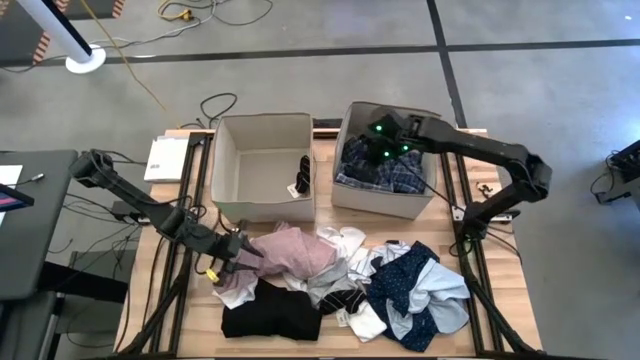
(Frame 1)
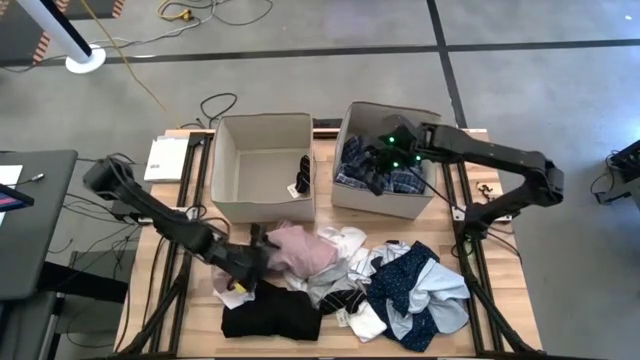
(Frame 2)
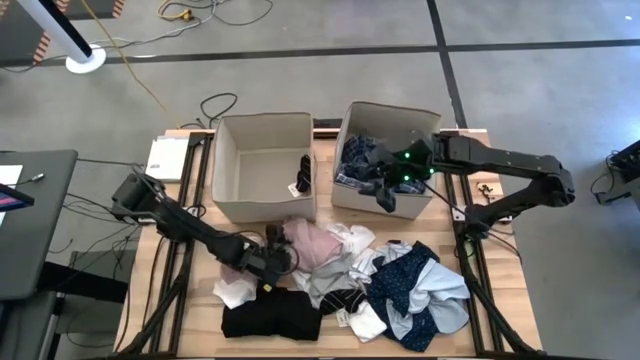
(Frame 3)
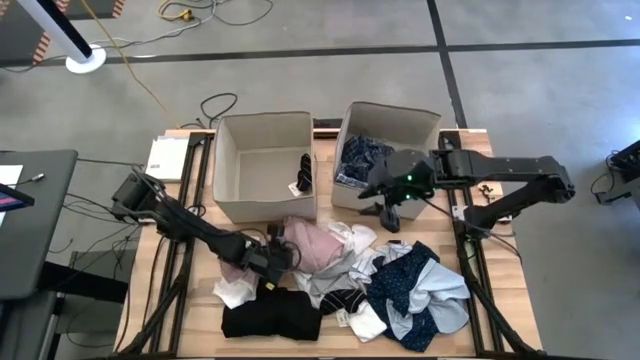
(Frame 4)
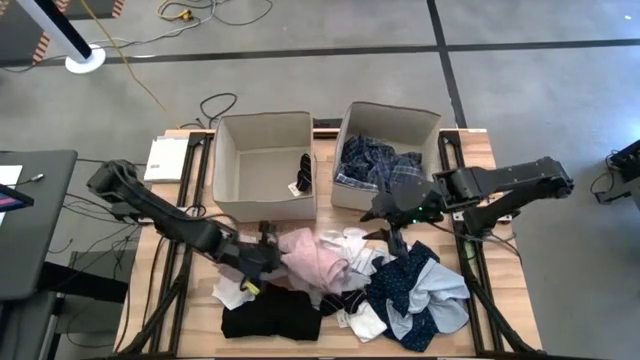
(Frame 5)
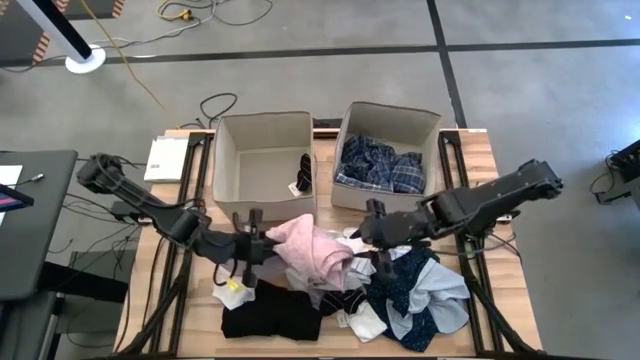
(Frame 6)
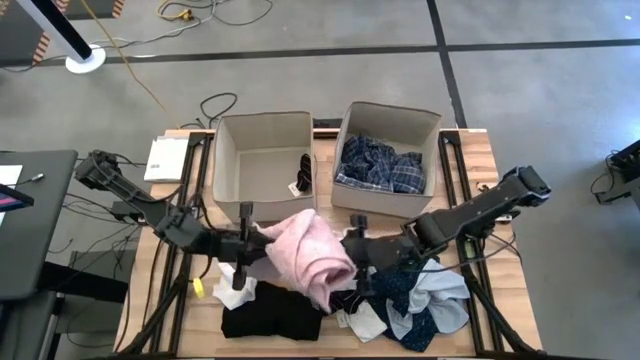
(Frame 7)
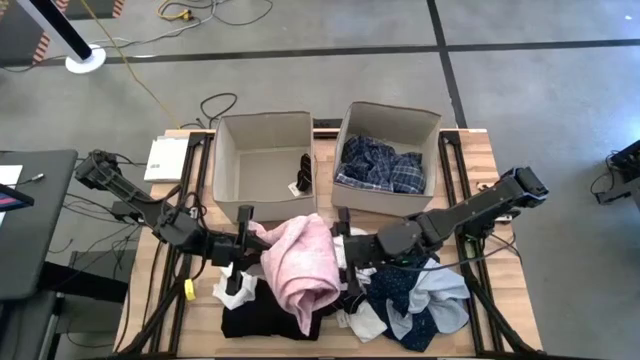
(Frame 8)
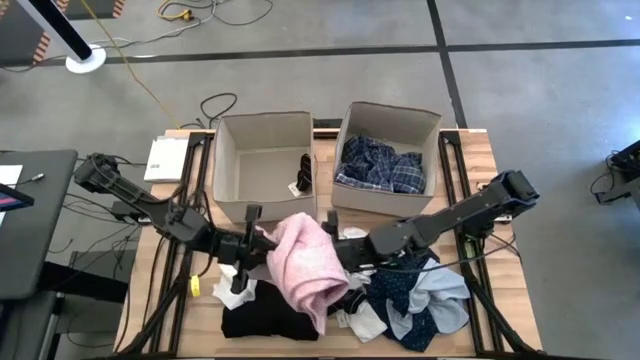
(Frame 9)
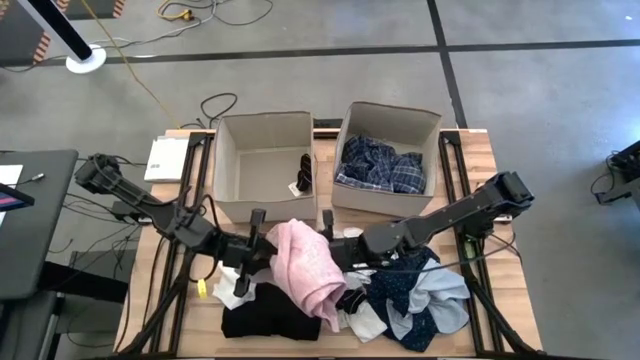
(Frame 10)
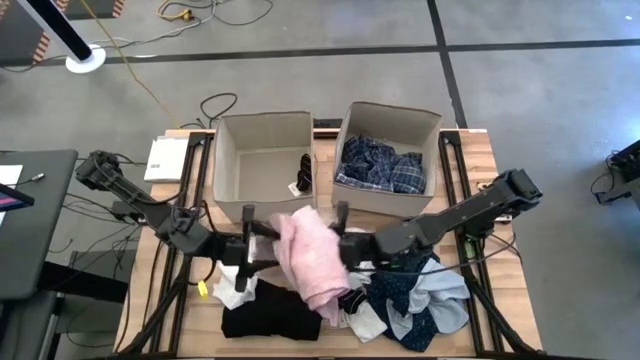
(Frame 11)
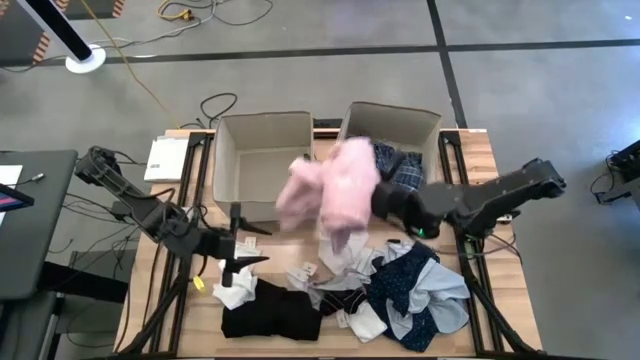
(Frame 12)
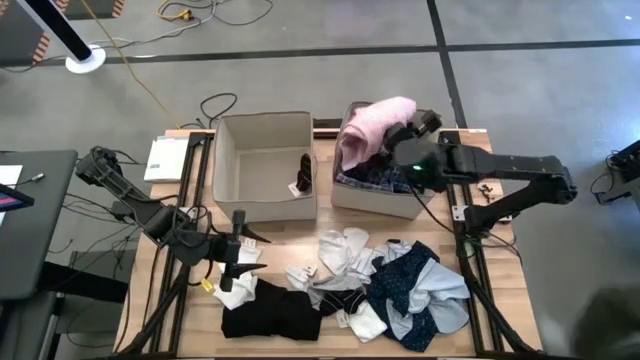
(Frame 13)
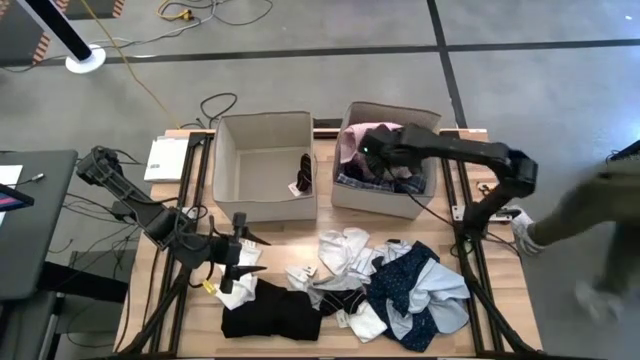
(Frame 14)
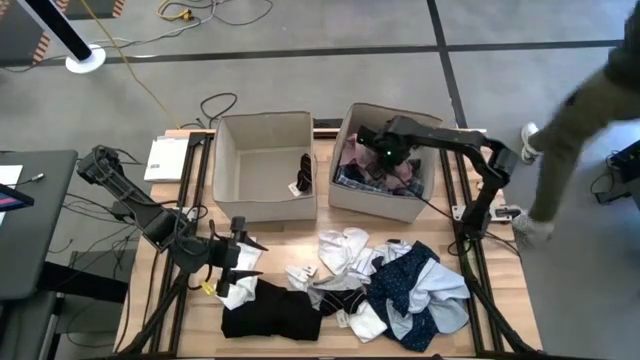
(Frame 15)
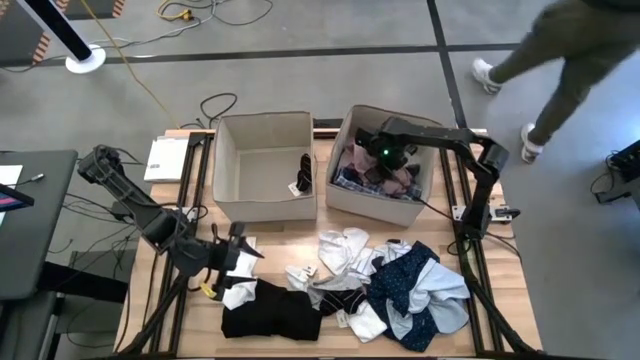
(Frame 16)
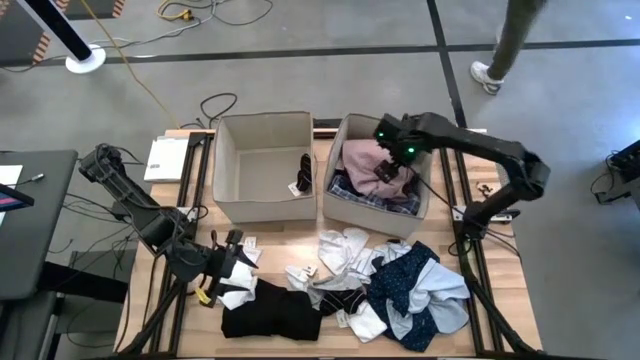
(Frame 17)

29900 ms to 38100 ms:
Task: Sort clothes
Put the pink towel into the right white laundry bin

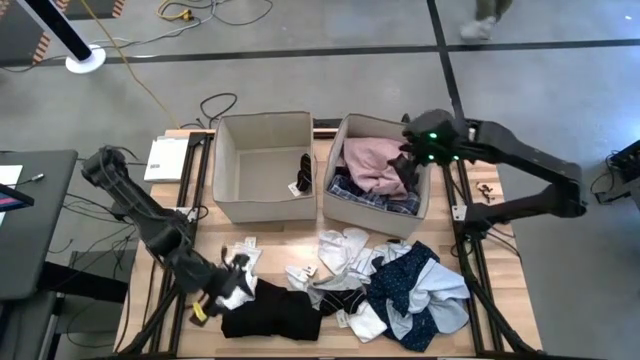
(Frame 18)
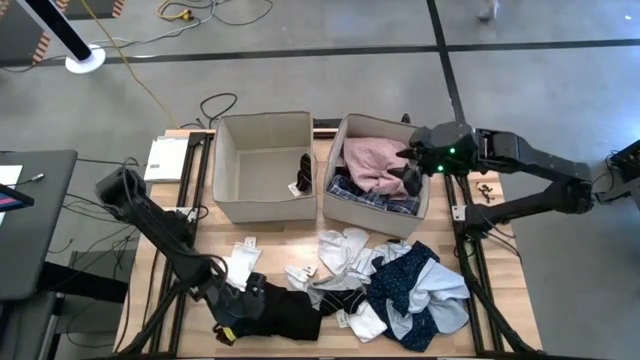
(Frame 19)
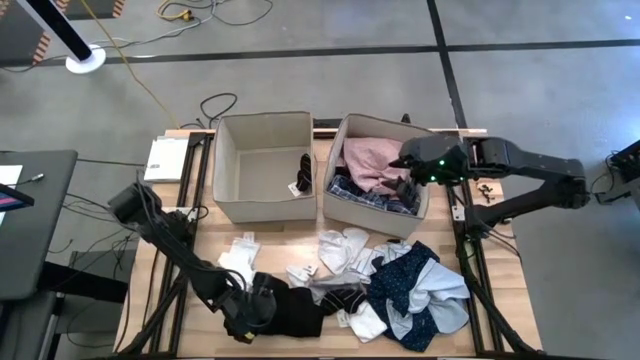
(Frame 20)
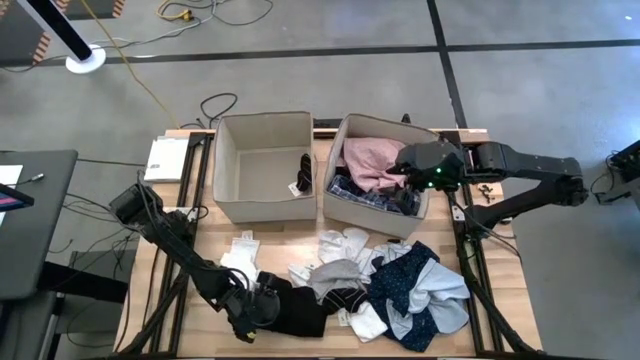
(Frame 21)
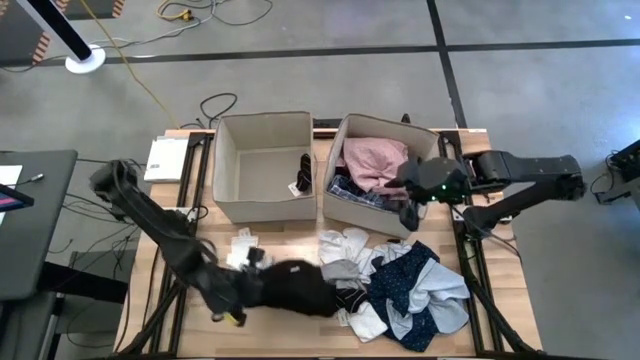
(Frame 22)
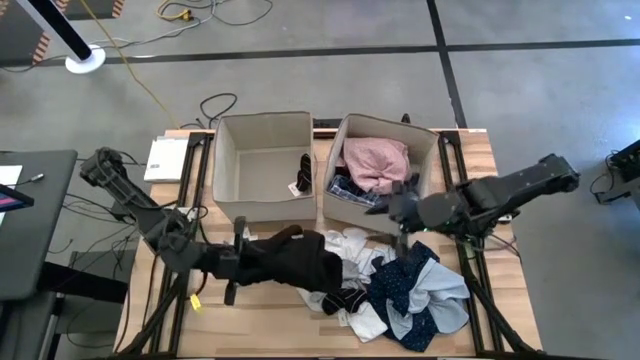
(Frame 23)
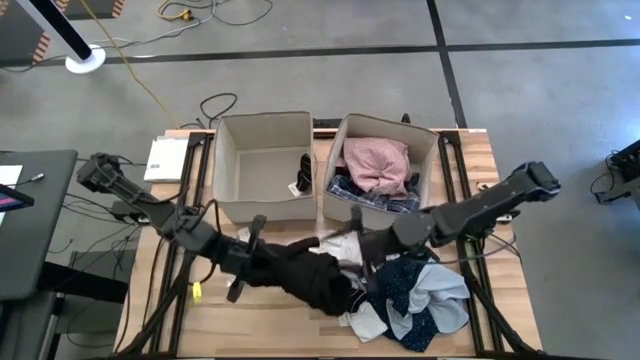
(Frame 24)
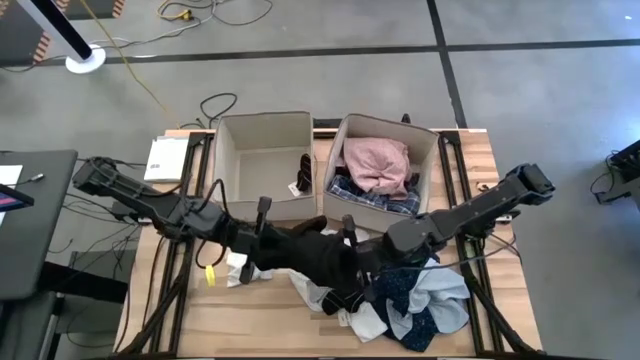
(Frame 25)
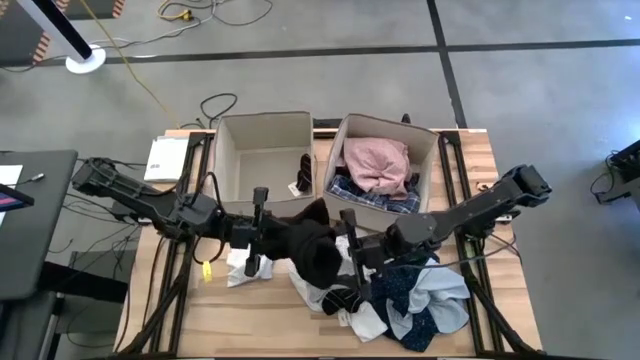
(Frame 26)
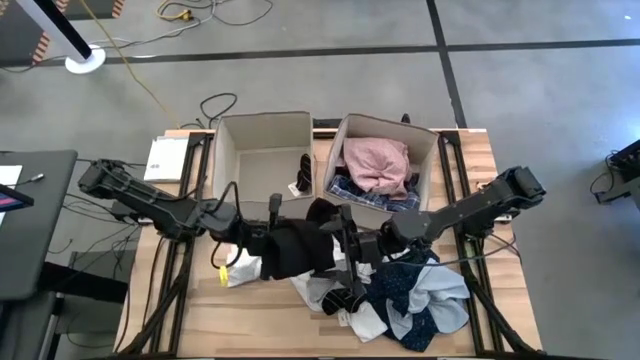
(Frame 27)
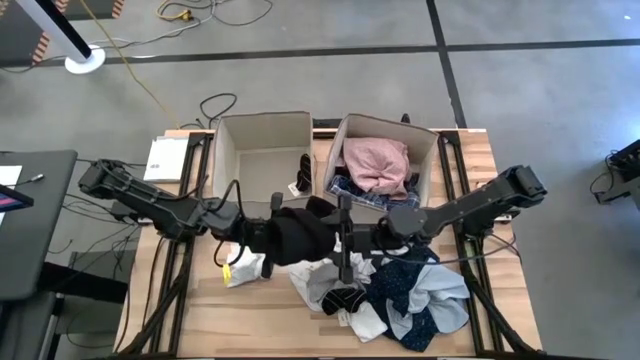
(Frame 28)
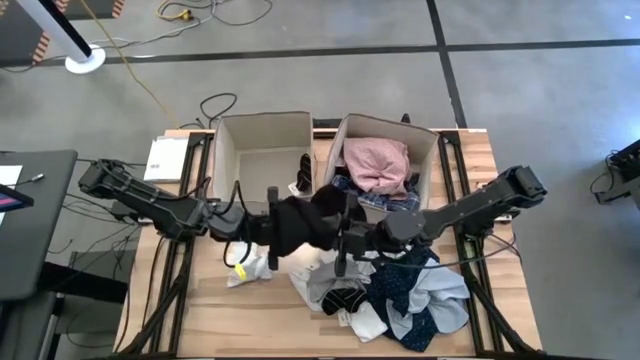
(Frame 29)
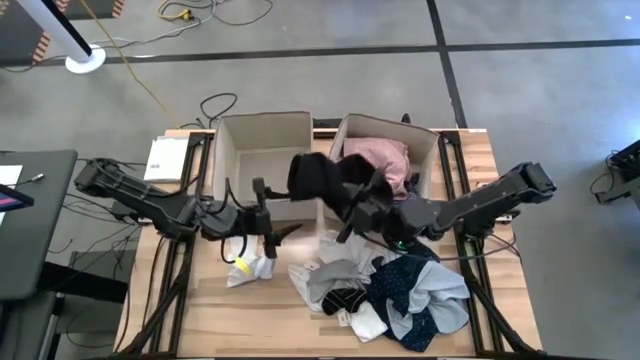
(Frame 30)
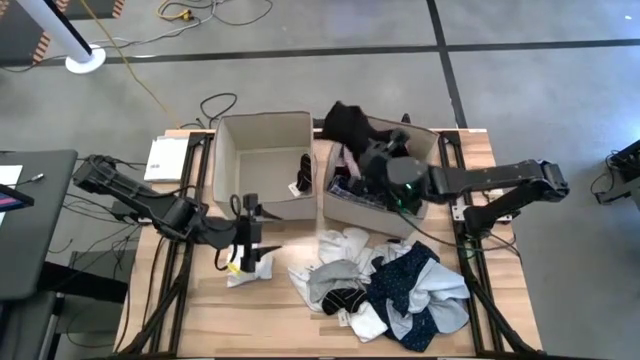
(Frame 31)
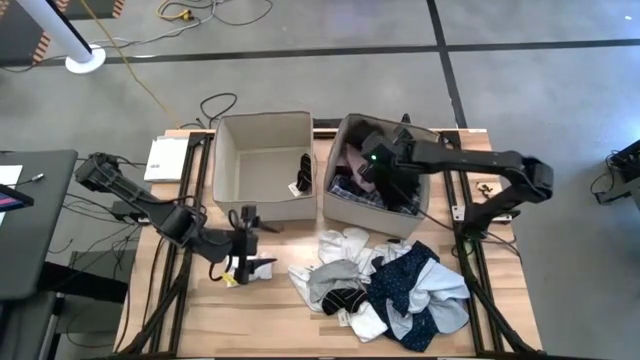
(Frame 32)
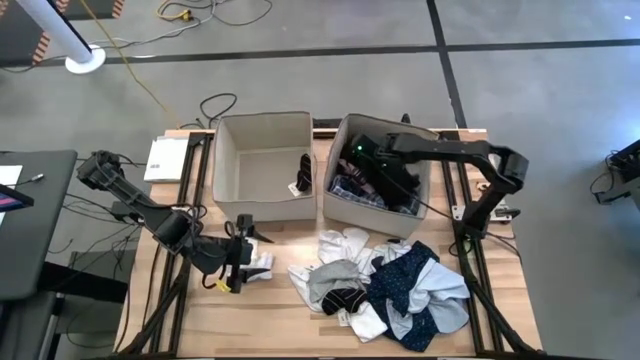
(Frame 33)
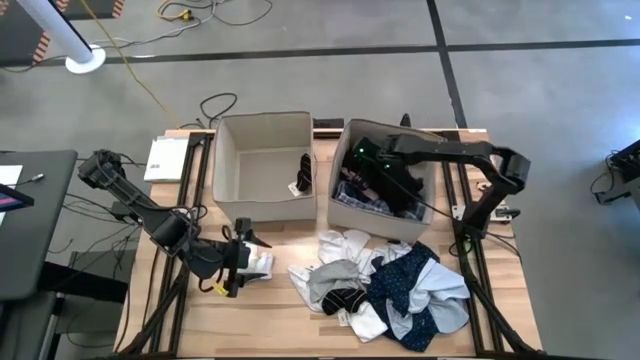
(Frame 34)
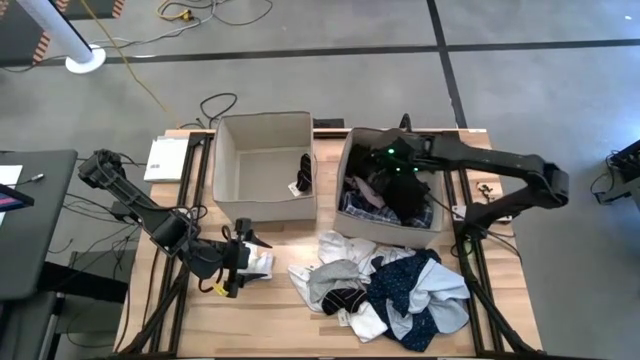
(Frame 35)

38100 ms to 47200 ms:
Put the black clothes into the right white laundry bin

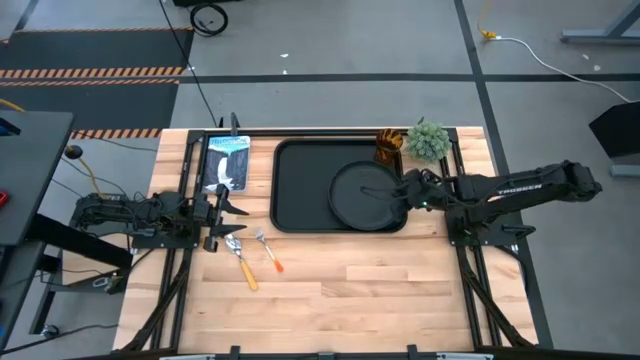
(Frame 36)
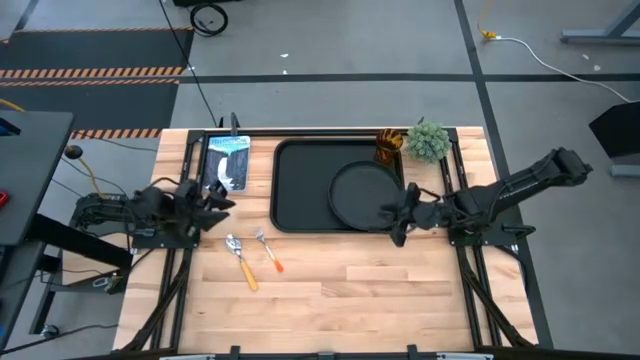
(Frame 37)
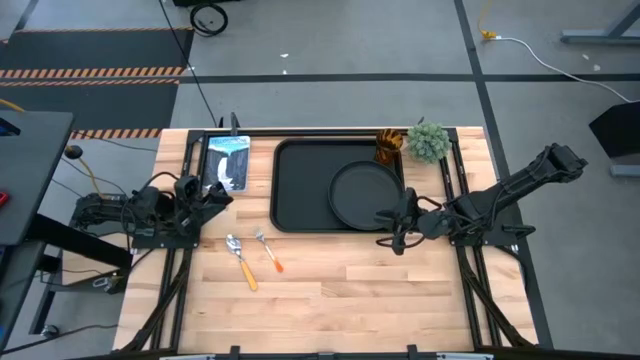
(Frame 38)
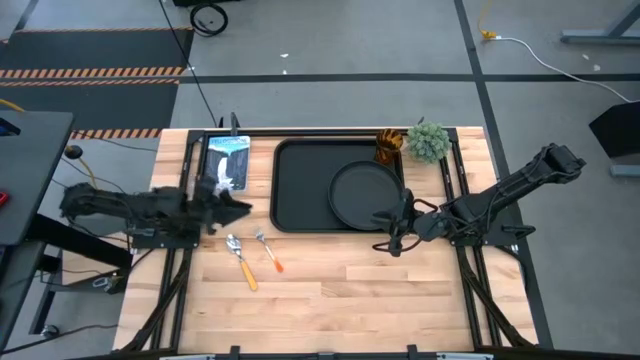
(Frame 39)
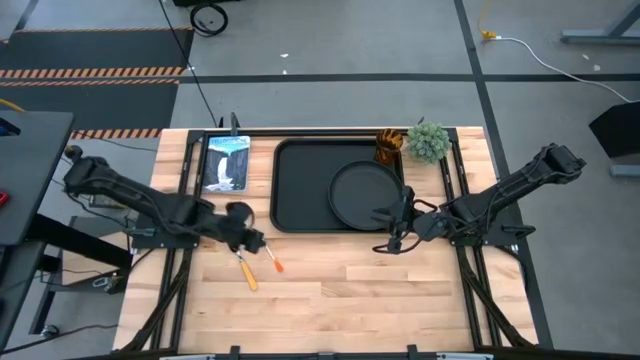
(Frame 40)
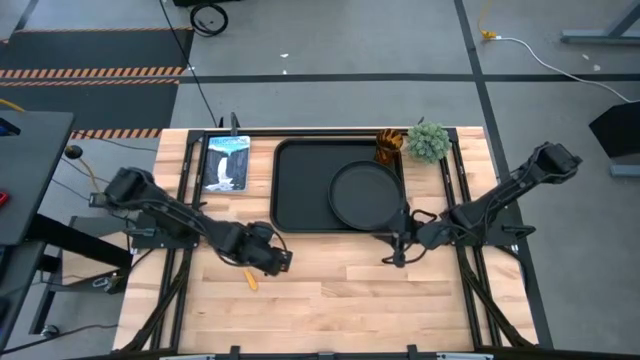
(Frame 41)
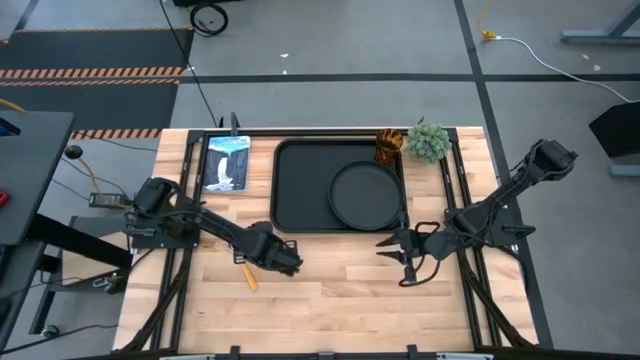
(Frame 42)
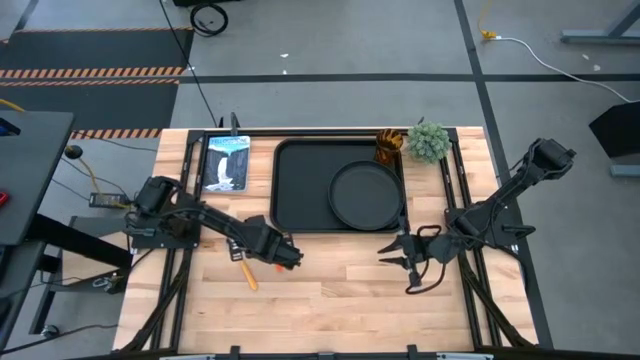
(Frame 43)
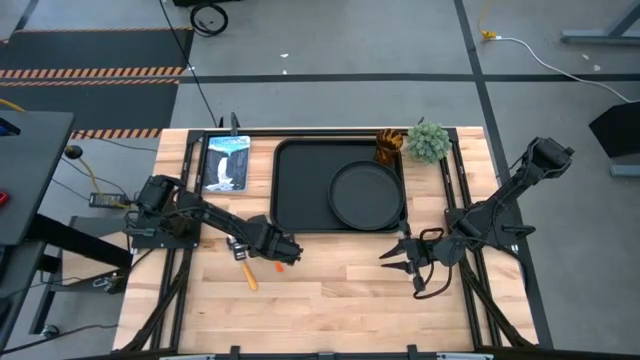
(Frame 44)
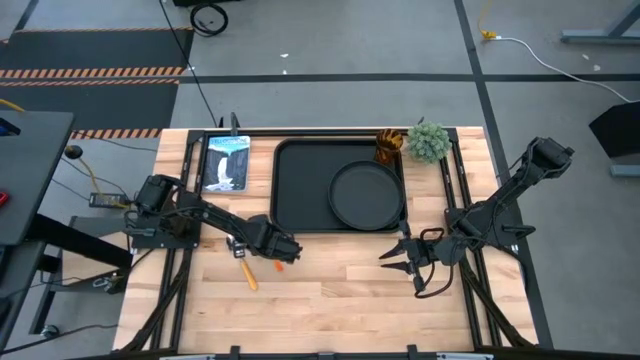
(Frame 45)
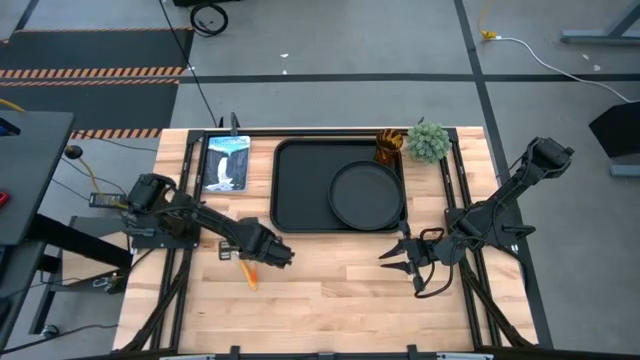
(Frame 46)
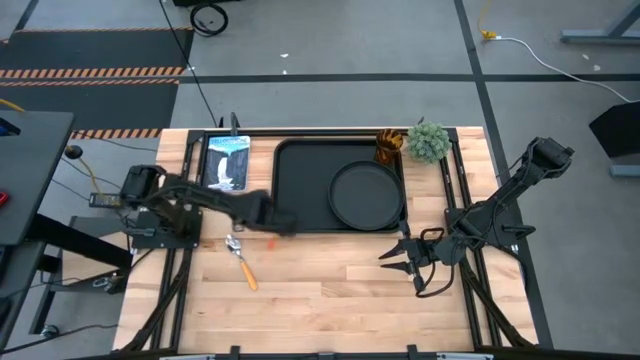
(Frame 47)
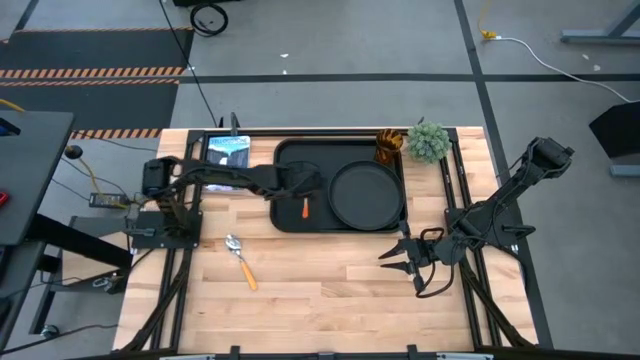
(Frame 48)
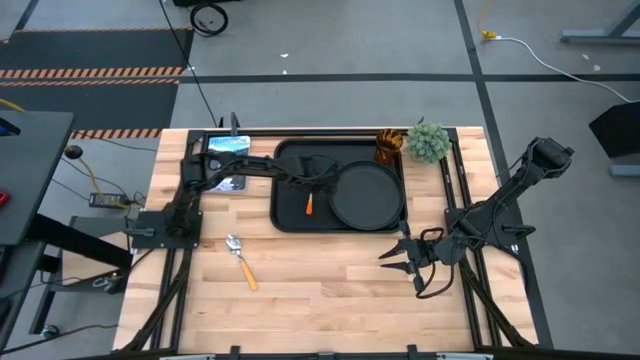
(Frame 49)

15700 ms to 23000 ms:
Task: Pick and place plate/cup/fork/spoon on tray
Put the orange fork on the black tray to the left of the black plate
